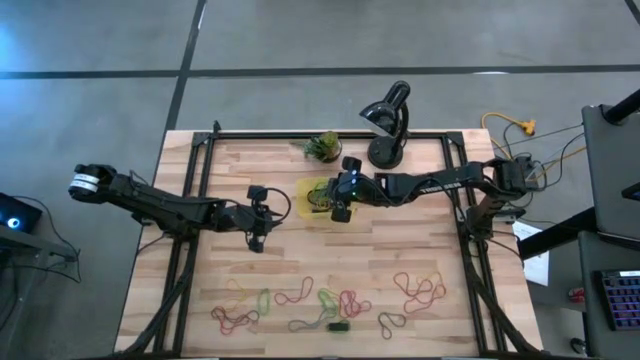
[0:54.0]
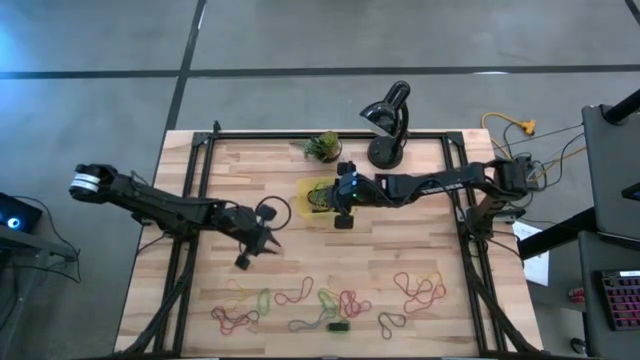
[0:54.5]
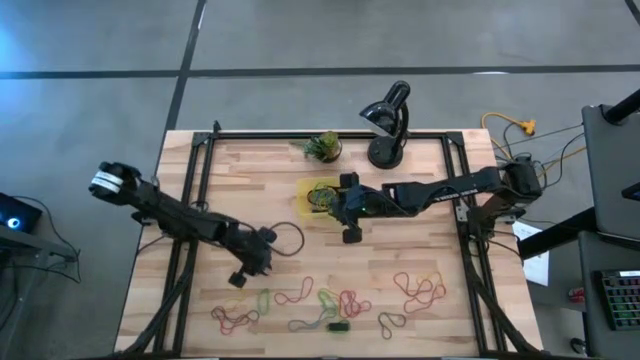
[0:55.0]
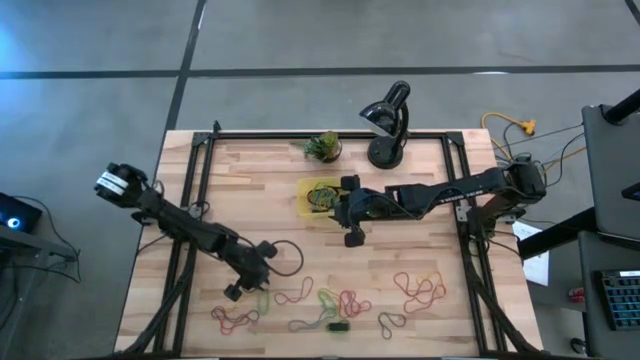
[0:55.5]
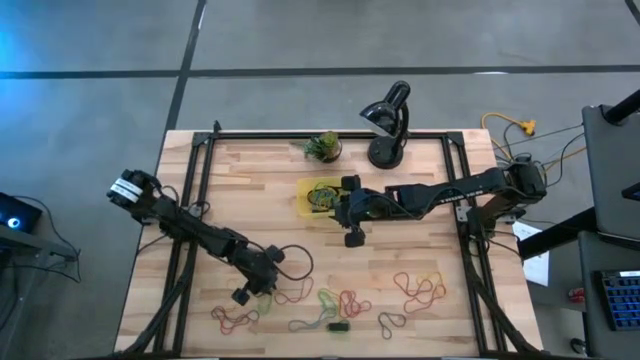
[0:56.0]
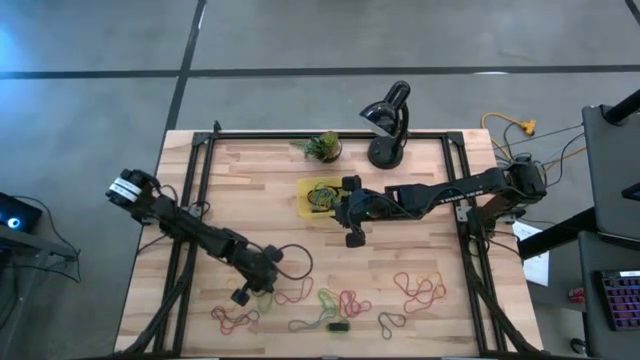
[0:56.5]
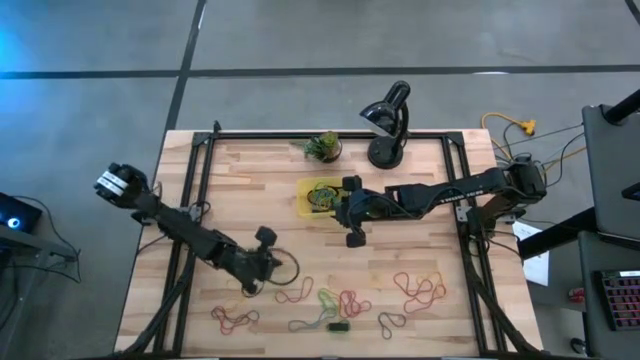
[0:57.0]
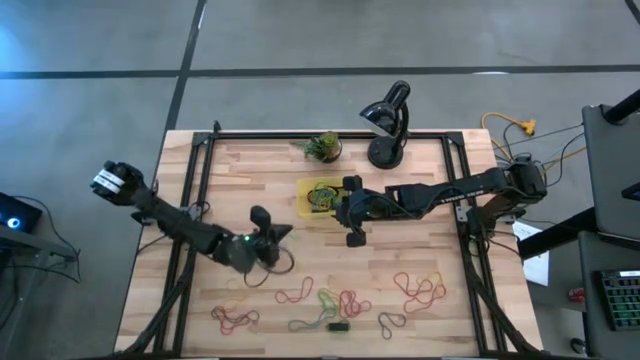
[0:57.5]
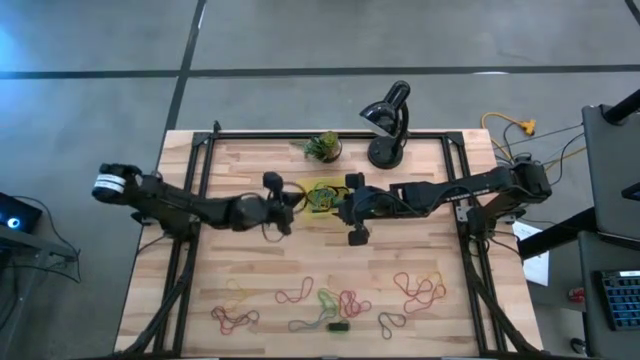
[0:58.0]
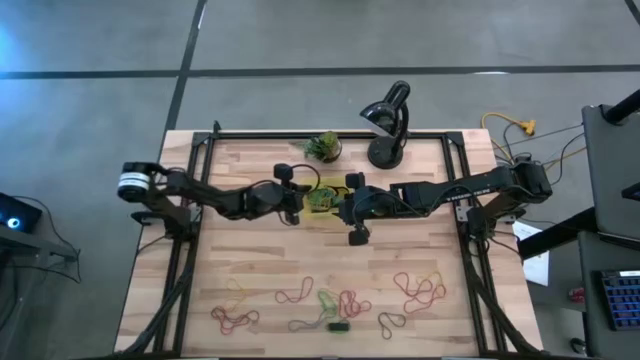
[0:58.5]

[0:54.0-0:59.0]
Task: Pick and place rubber bands into bin
Put the green rubber band in the yellow bin

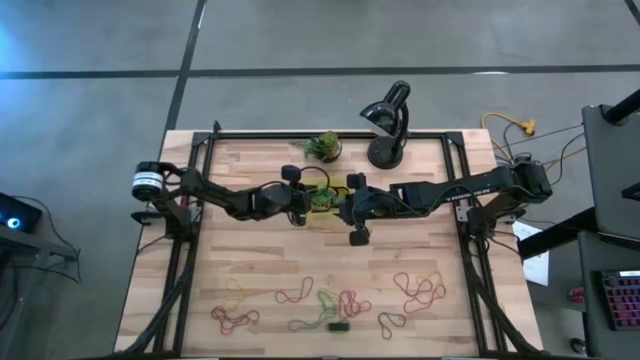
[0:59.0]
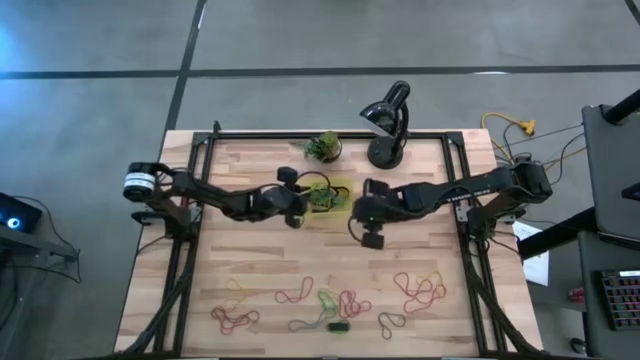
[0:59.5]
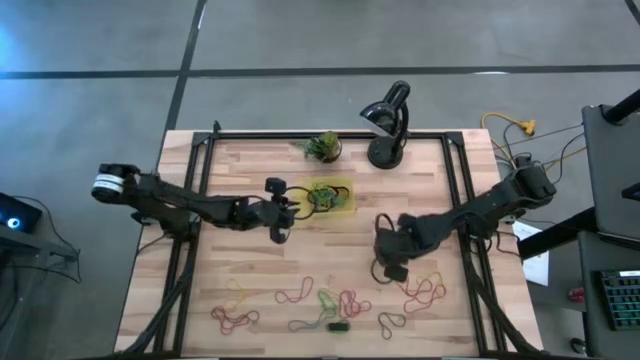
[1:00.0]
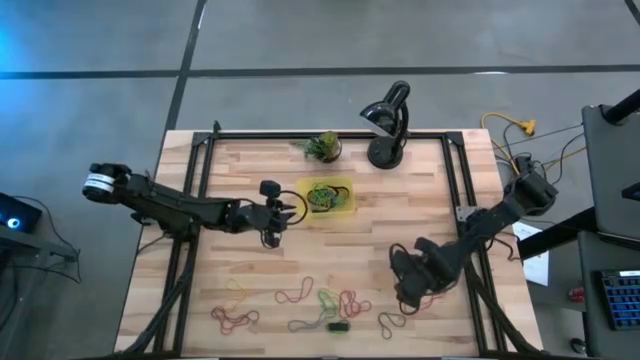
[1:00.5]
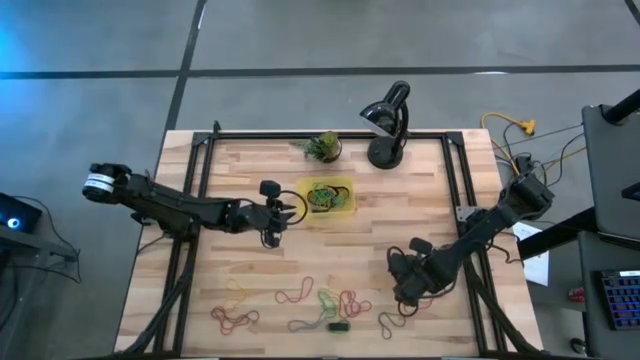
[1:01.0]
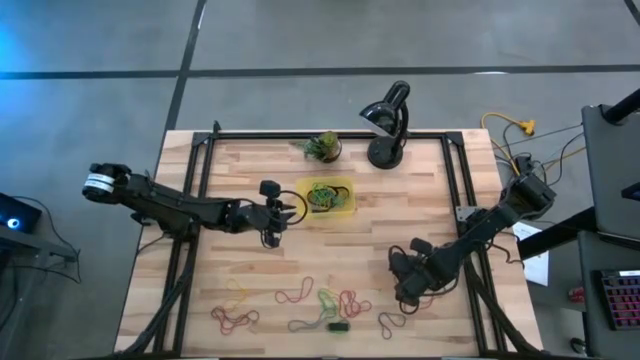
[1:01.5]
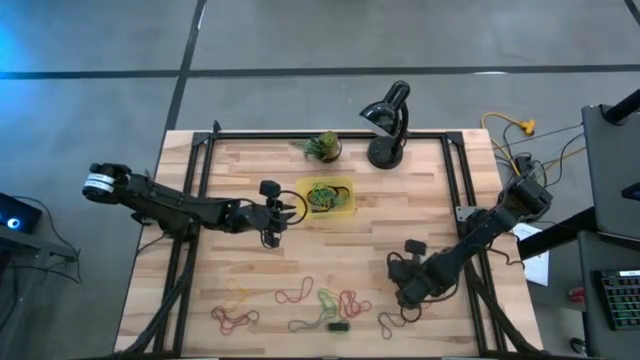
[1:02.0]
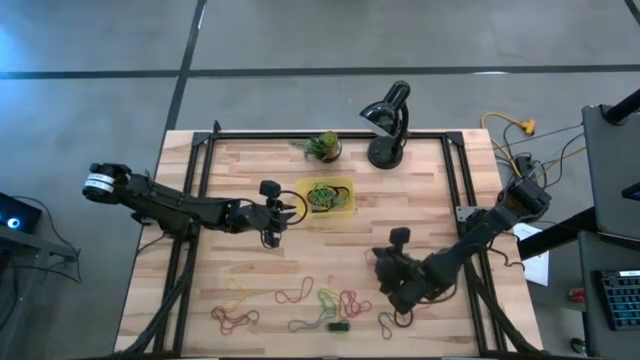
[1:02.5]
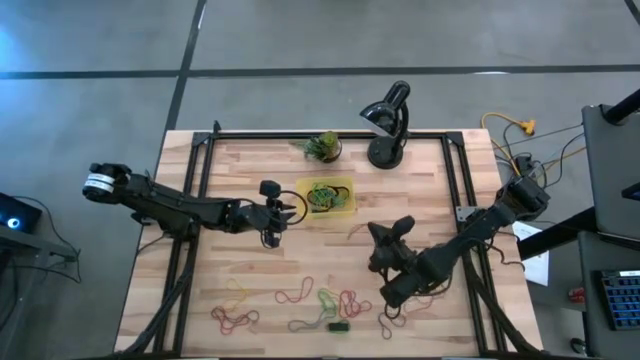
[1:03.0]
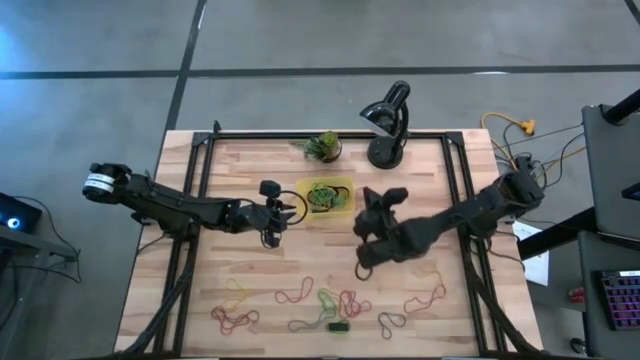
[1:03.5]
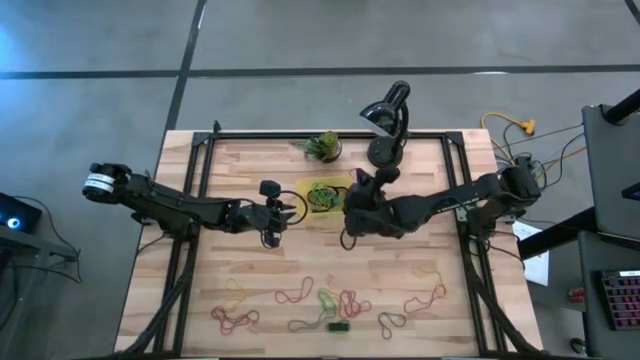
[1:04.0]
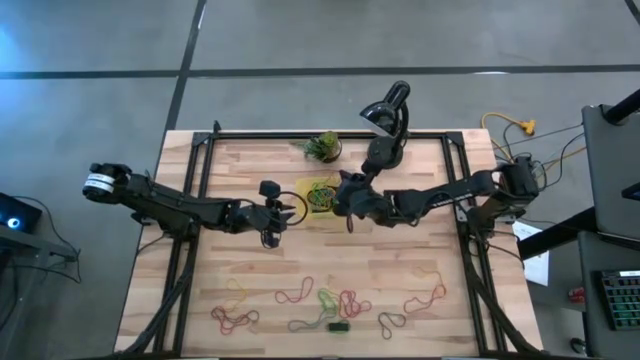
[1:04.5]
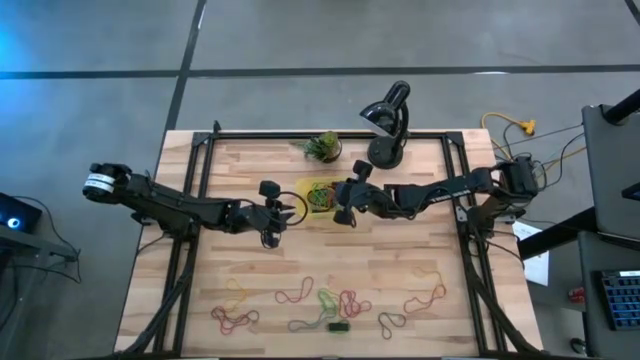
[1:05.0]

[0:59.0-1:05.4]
Put the red rubber band in the yellow bin

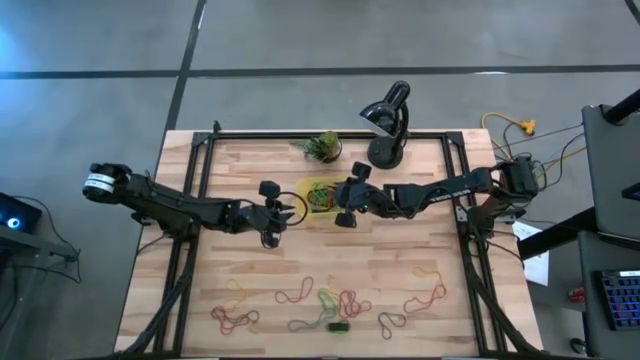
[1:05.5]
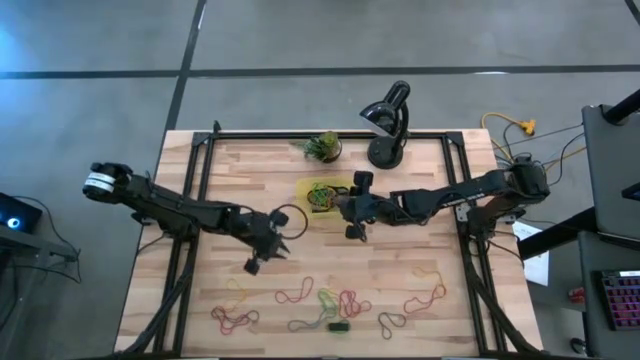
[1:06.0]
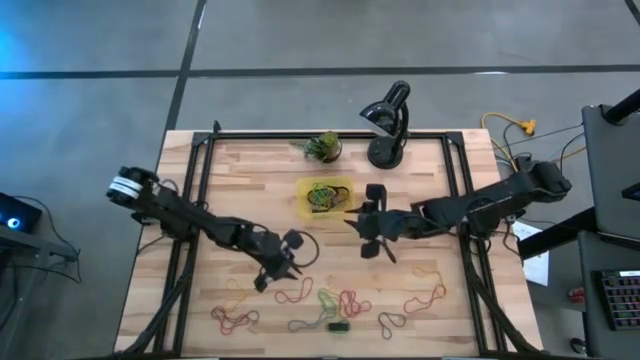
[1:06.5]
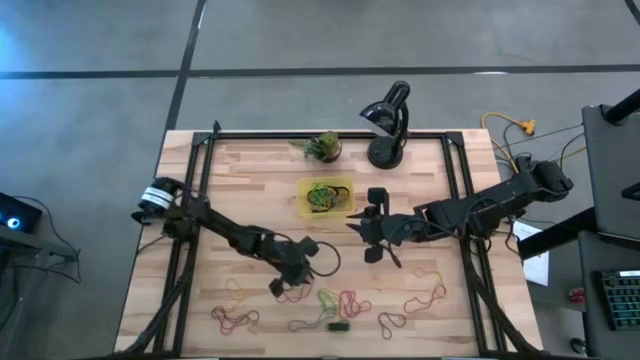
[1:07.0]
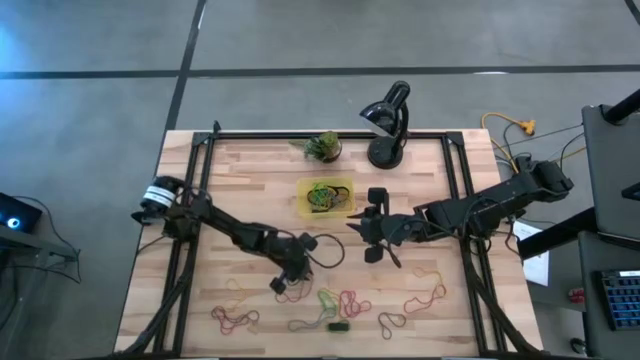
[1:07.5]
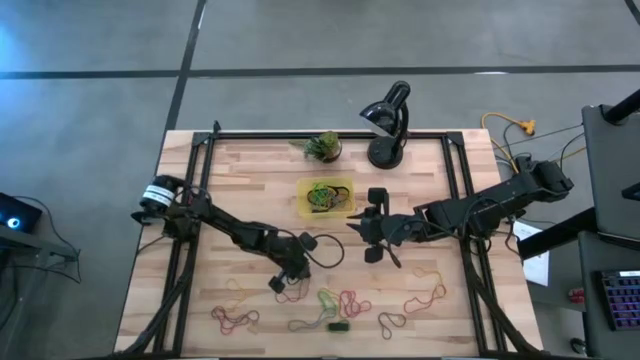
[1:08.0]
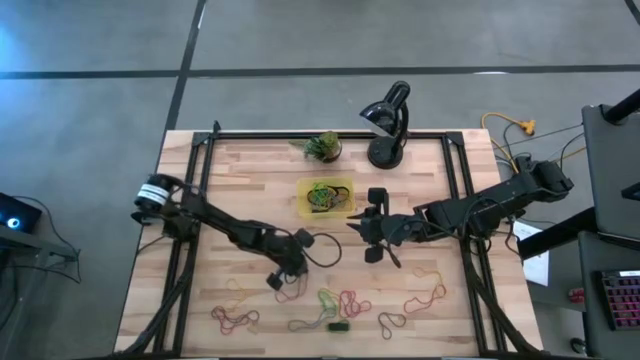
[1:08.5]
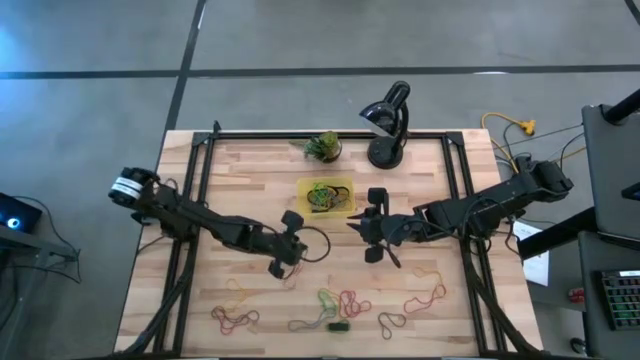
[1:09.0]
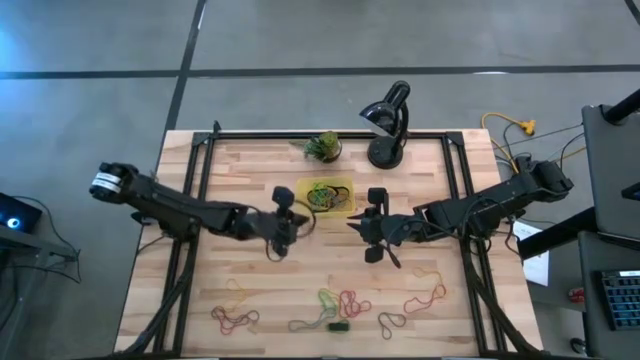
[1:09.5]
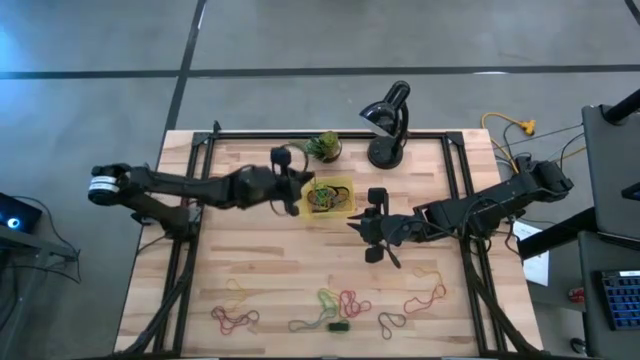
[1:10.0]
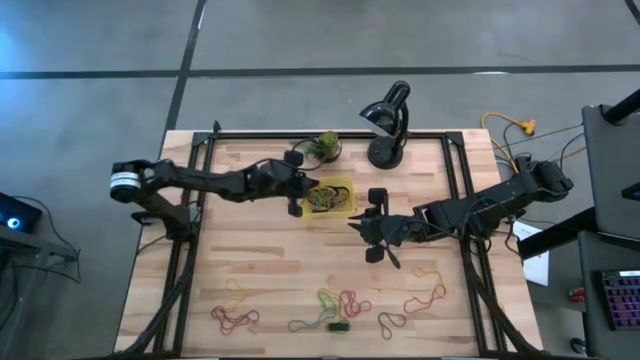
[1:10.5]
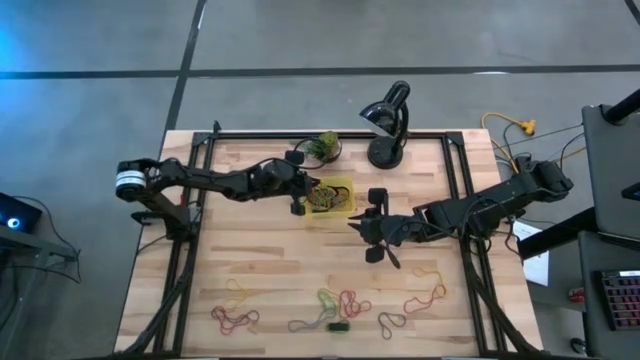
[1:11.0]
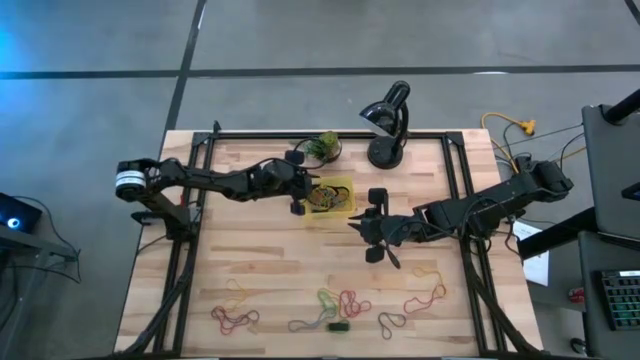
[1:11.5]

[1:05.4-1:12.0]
Put the red rubber band in the yellow bin

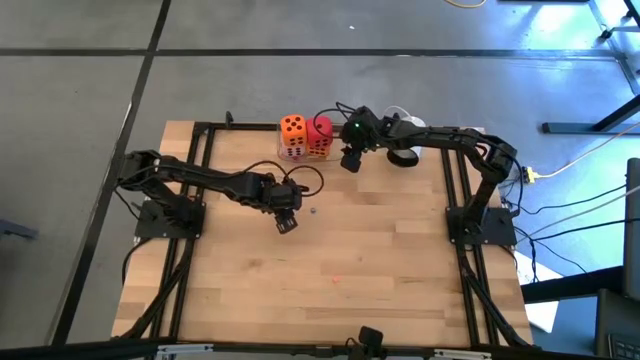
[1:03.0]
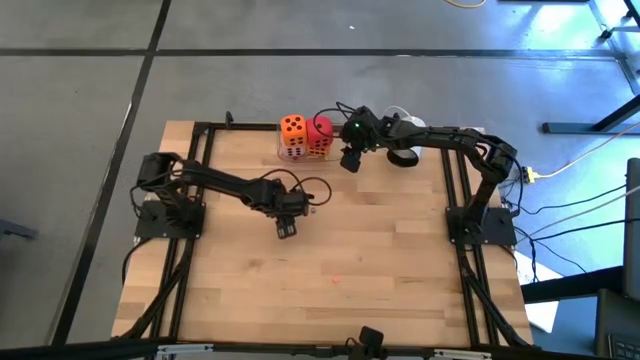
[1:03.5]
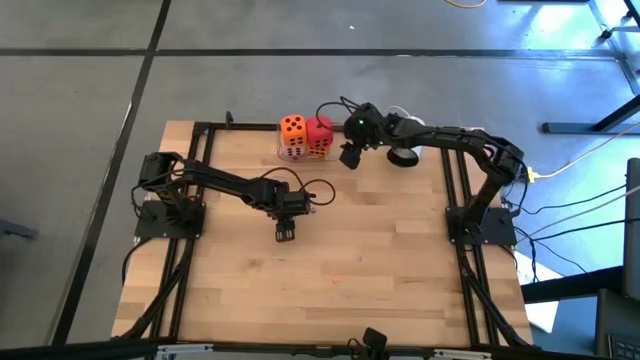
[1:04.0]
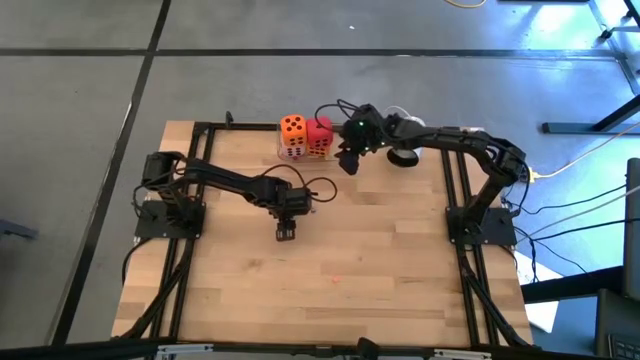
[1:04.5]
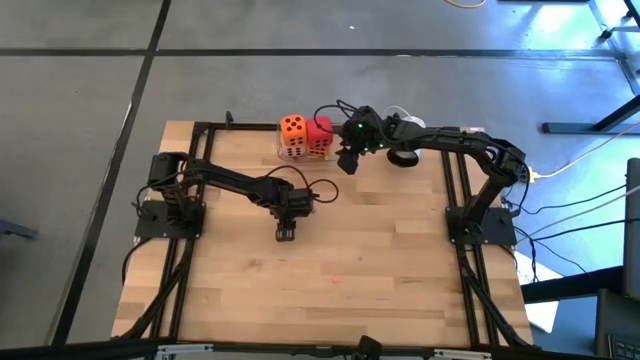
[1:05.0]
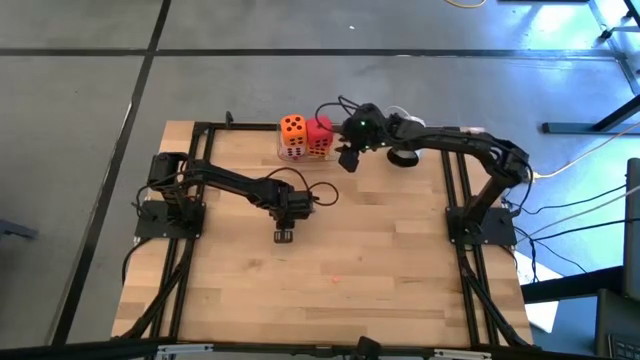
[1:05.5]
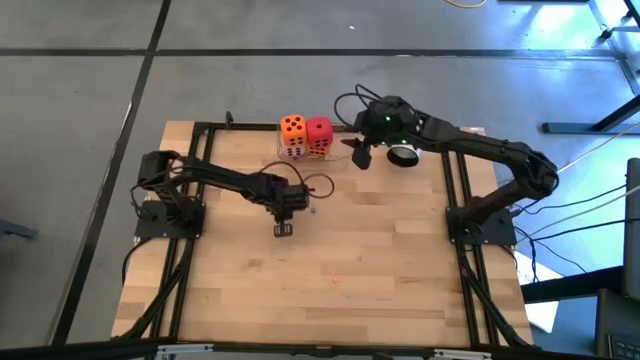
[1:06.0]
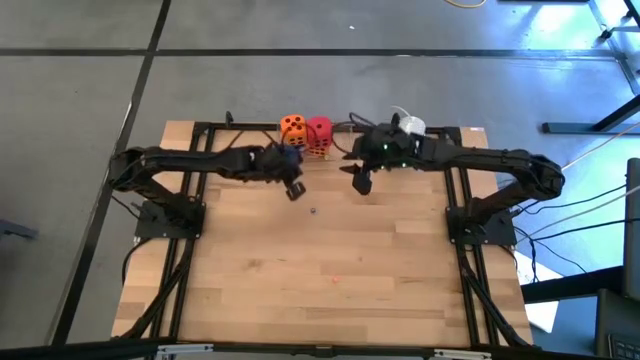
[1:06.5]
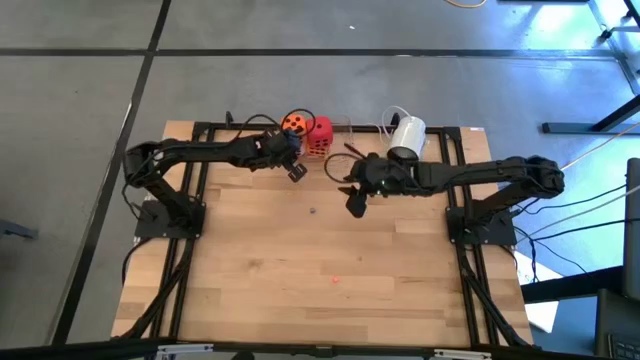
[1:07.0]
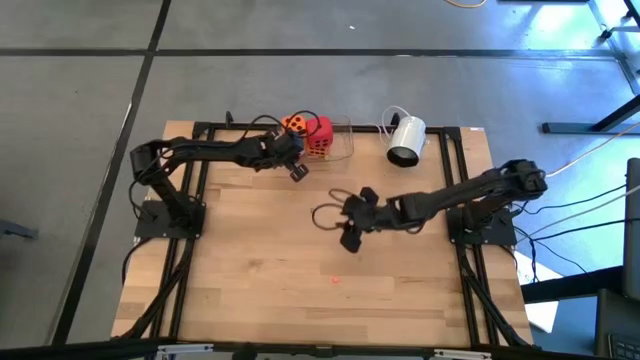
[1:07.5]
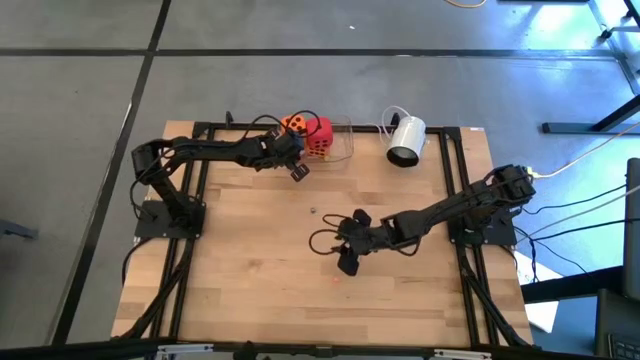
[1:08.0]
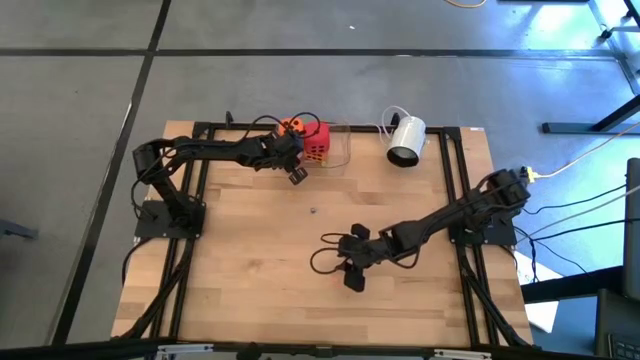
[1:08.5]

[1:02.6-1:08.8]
Task: Pick & Place Dice
Put the small blue dice in the transparent bin
